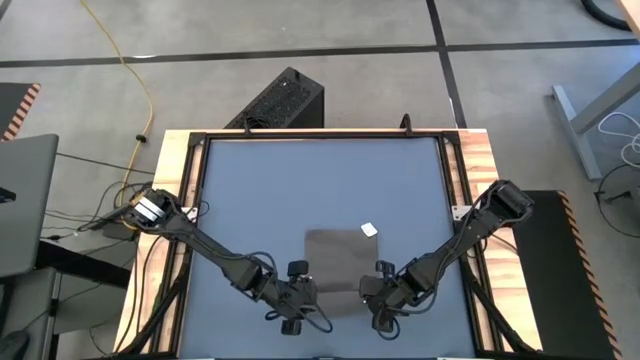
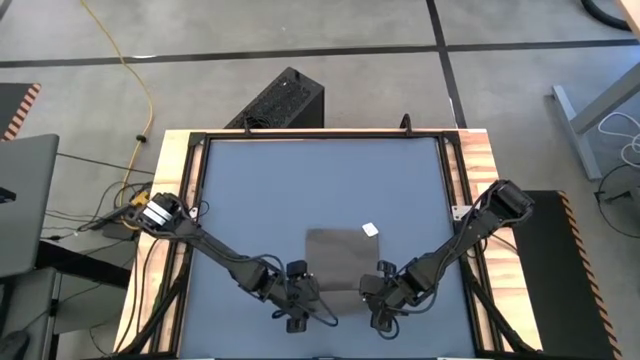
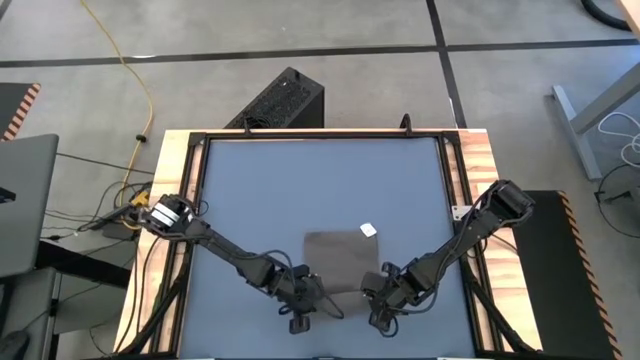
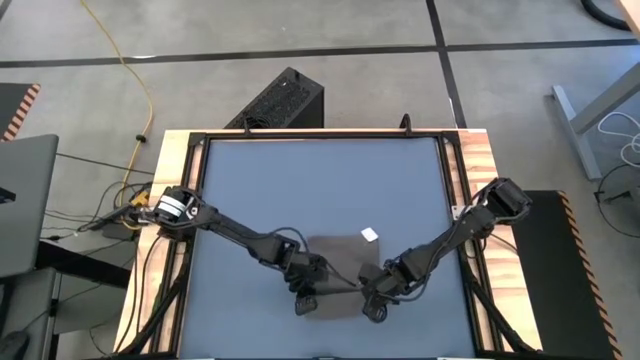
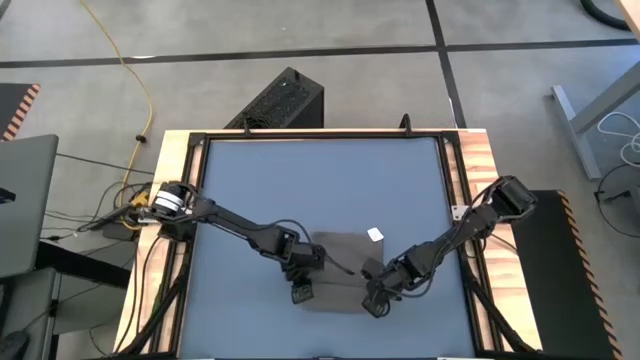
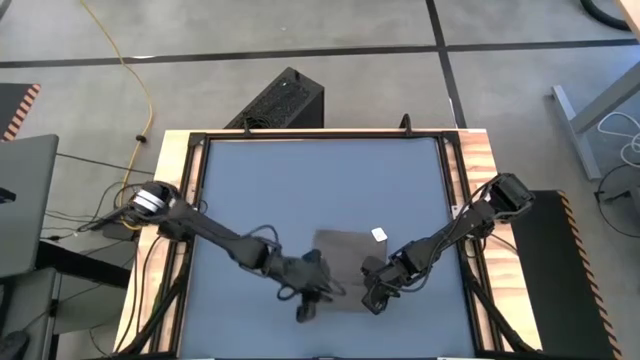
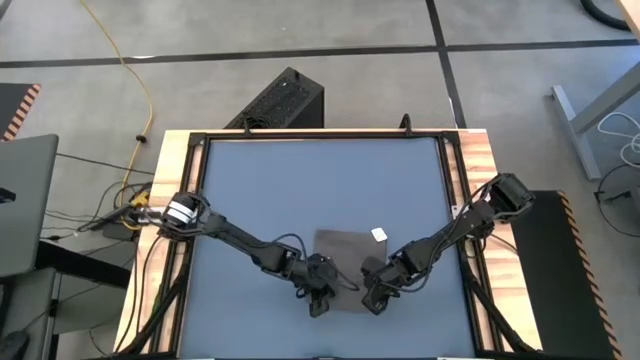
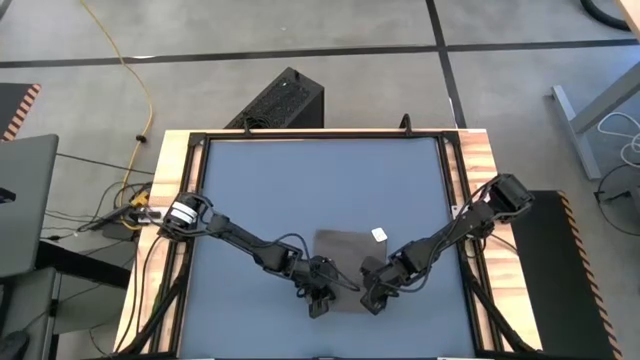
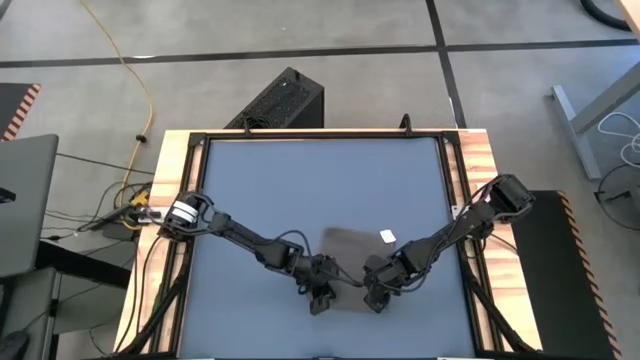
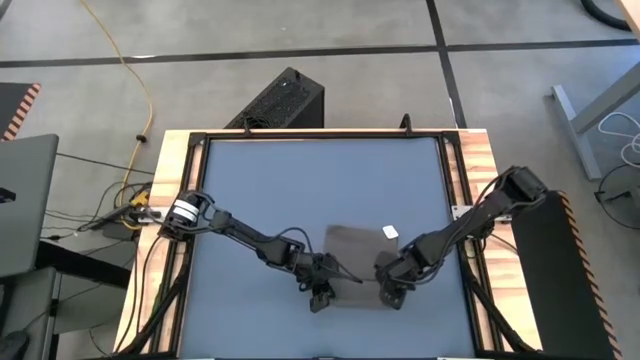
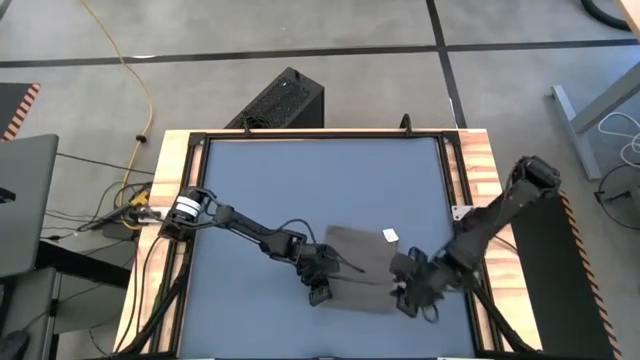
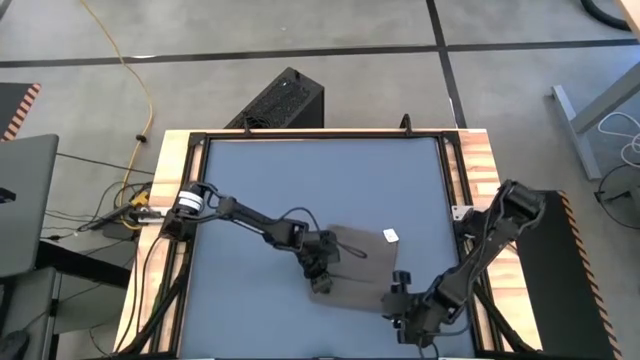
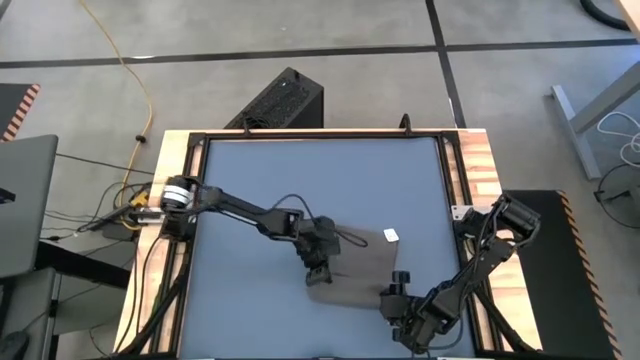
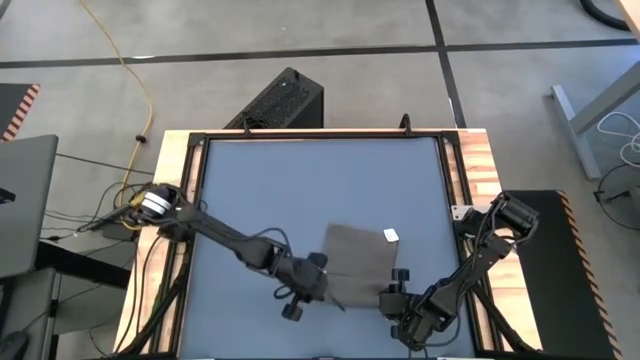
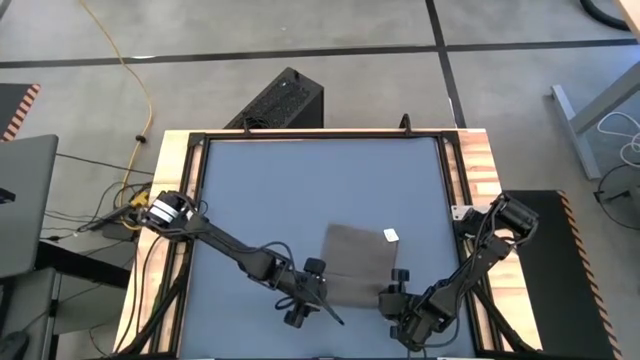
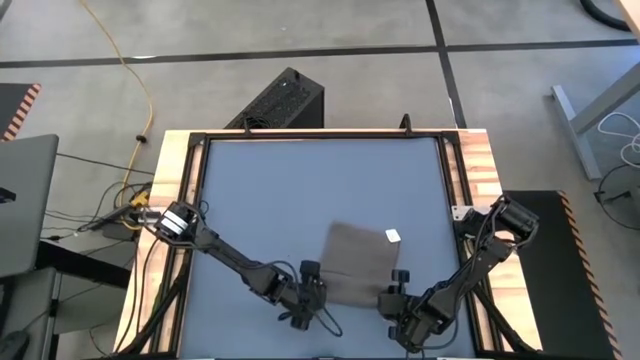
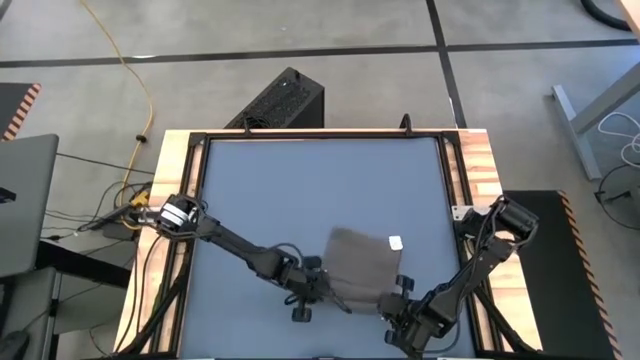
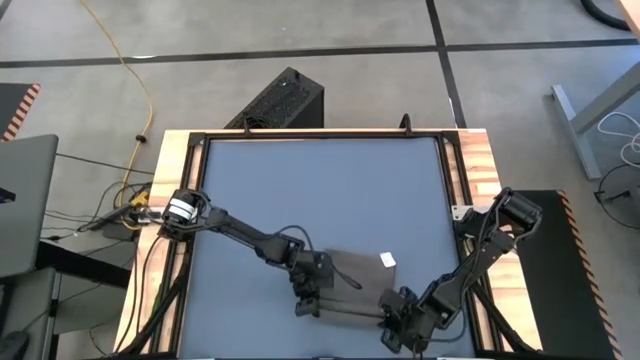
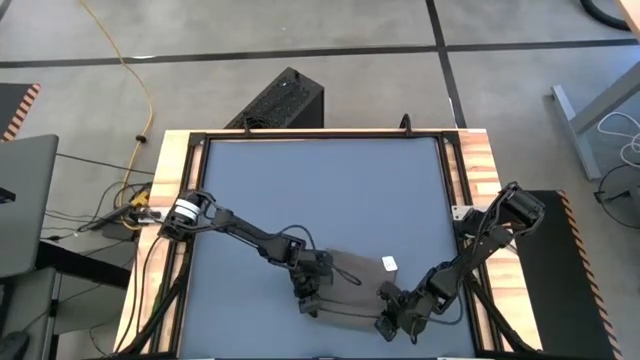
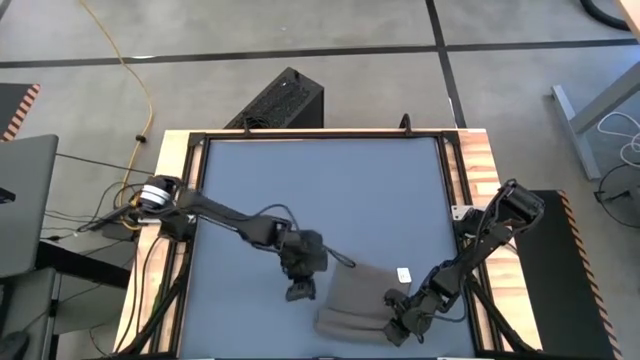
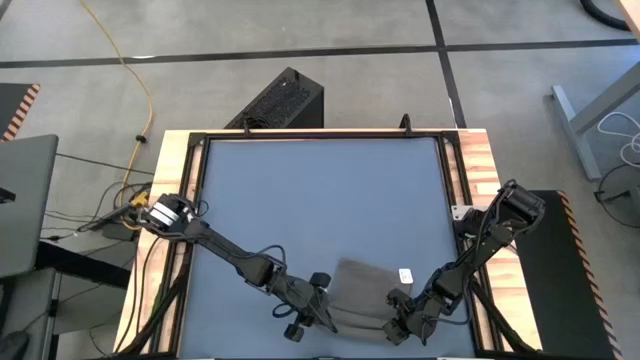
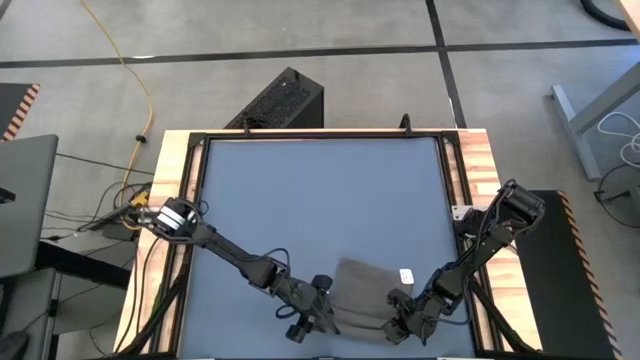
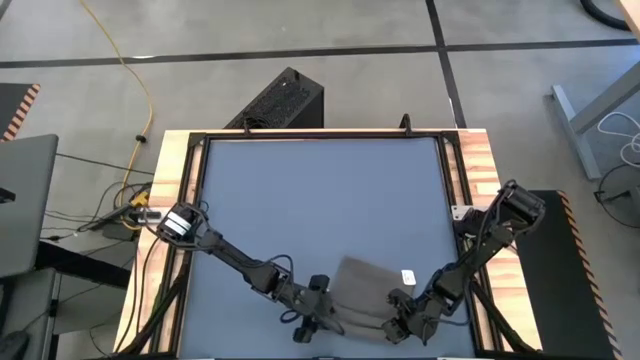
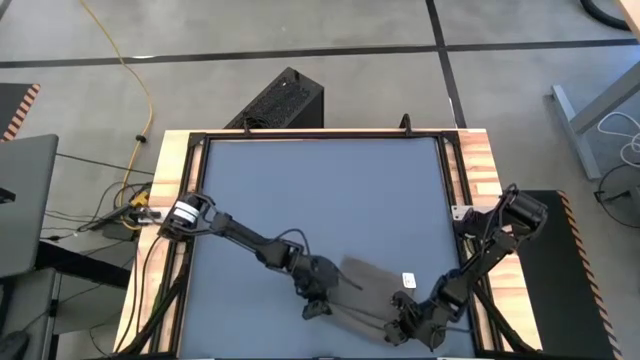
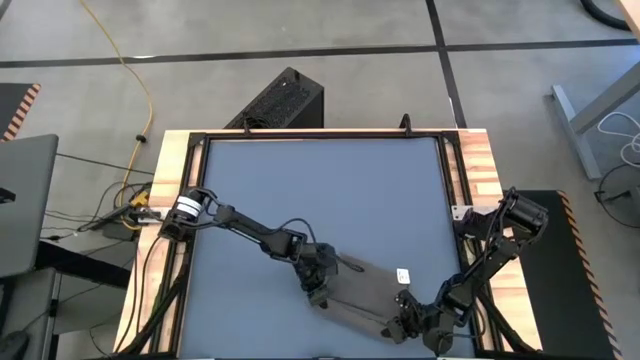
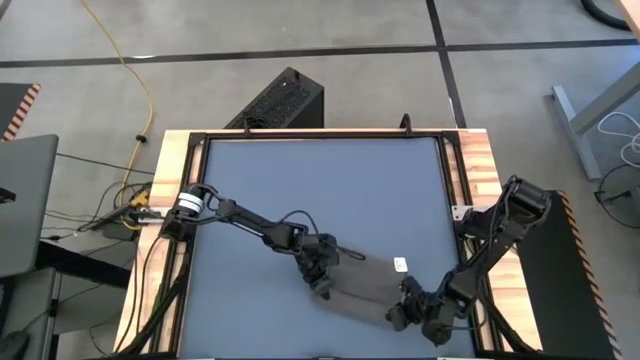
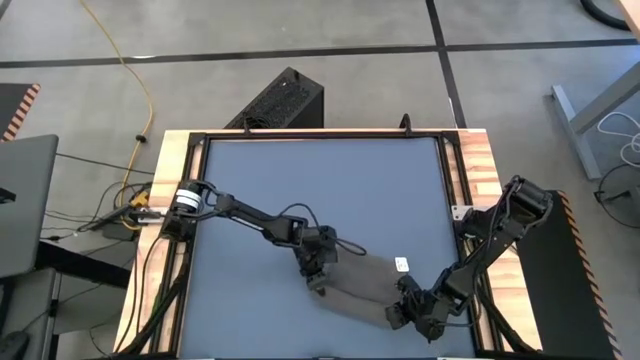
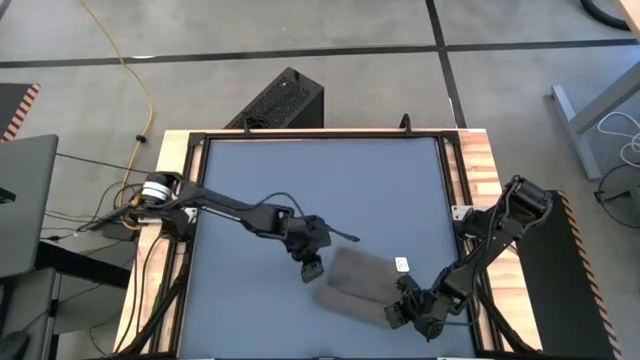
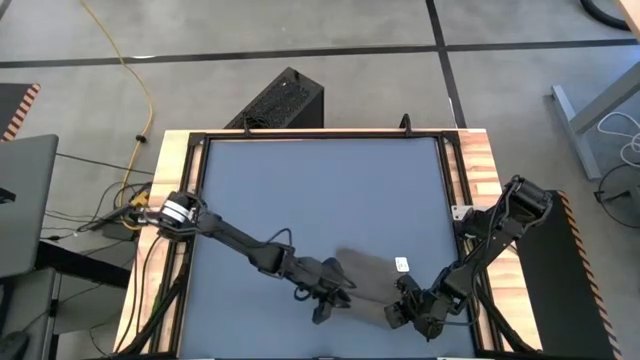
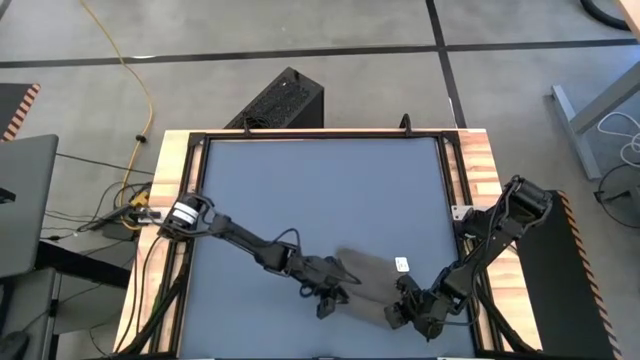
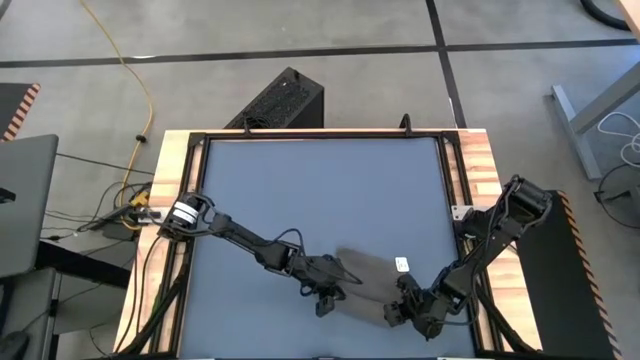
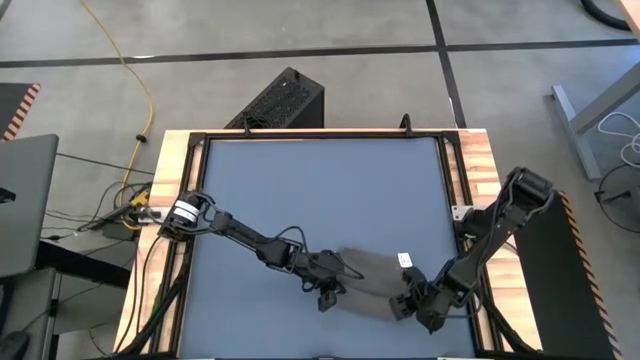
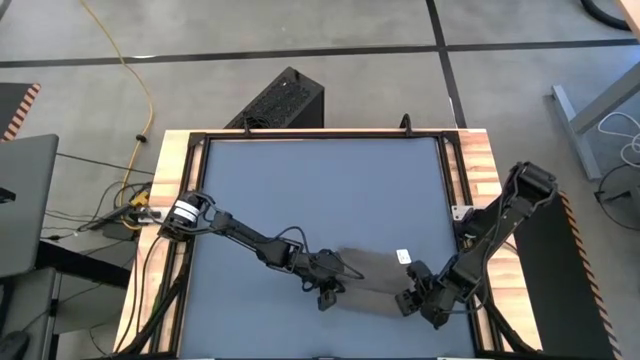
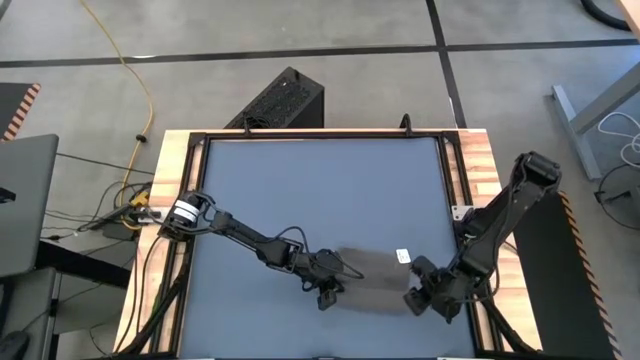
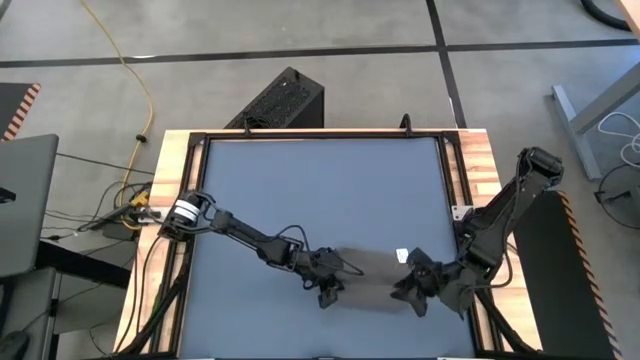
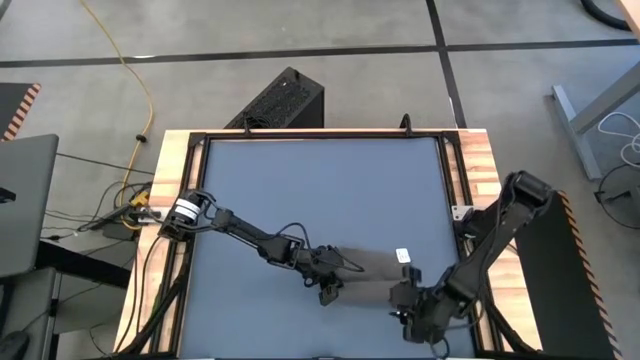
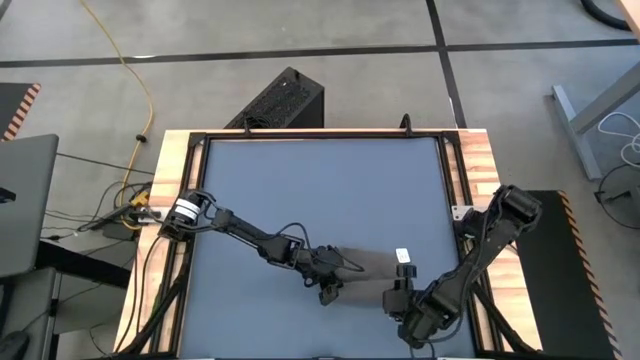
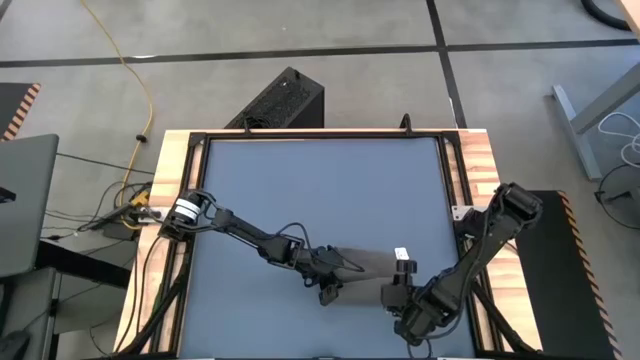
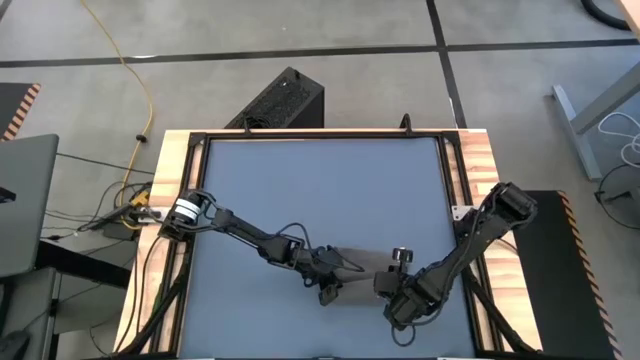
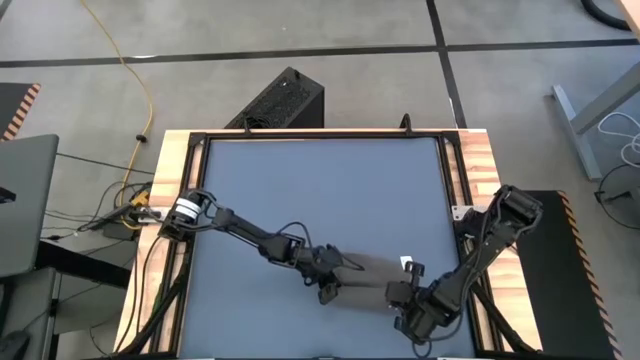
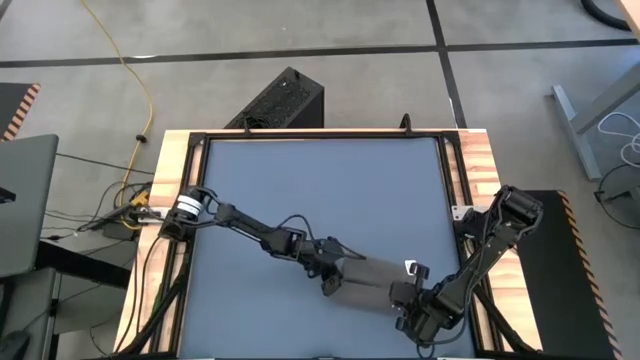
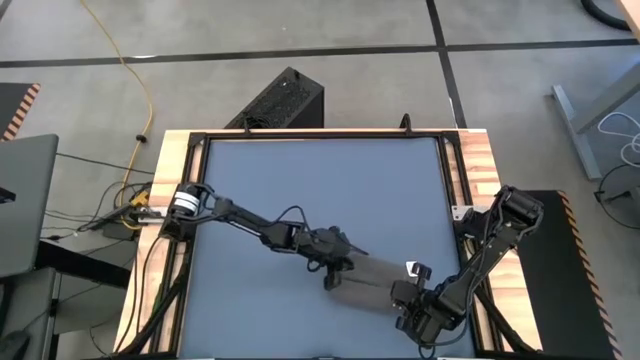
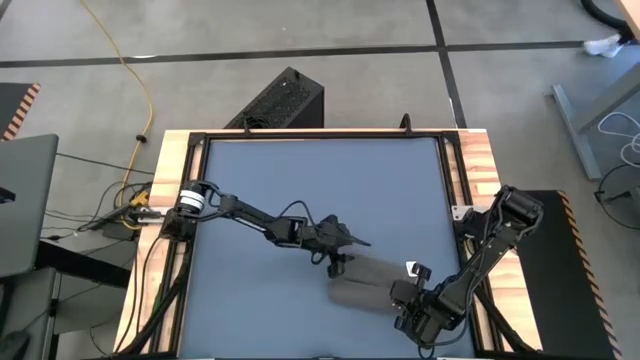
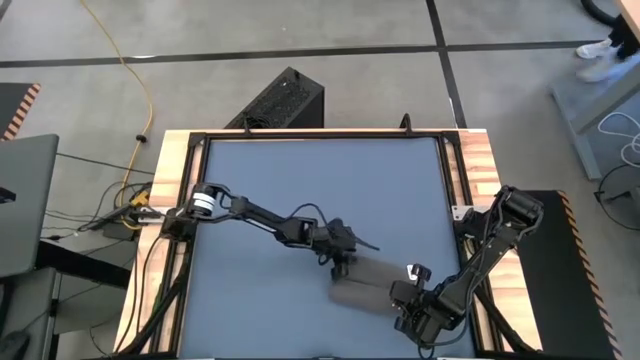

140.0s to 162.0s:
Task: Roll towel
Roll the grey towel
